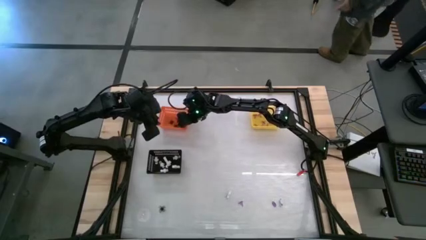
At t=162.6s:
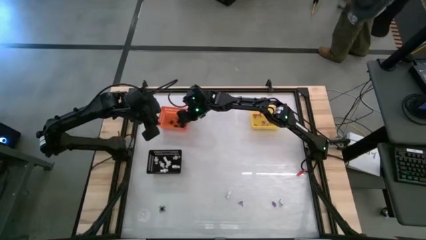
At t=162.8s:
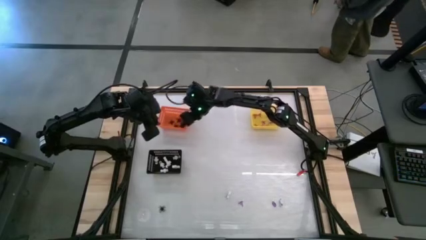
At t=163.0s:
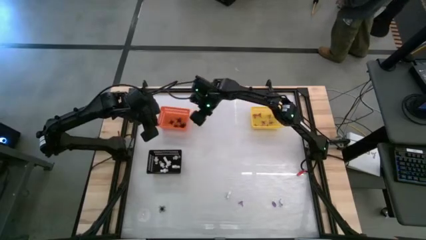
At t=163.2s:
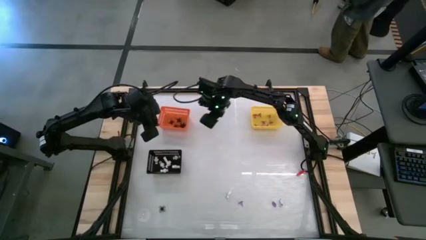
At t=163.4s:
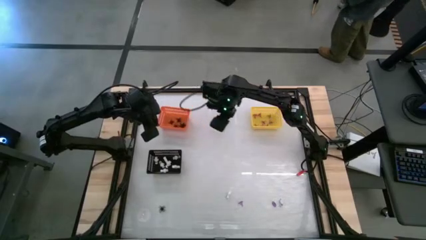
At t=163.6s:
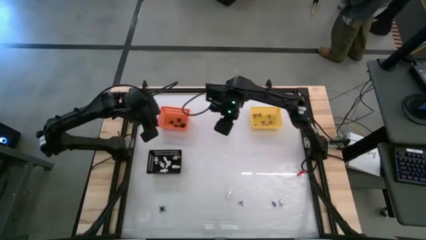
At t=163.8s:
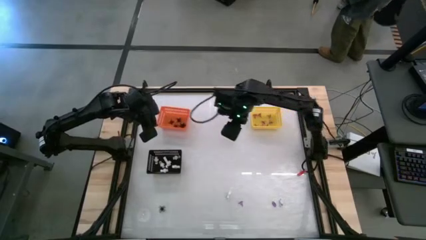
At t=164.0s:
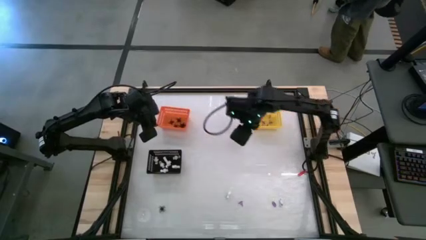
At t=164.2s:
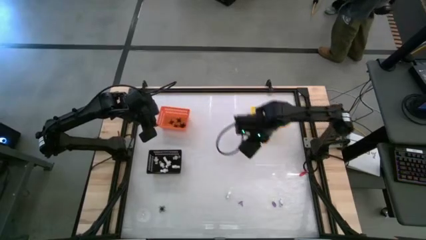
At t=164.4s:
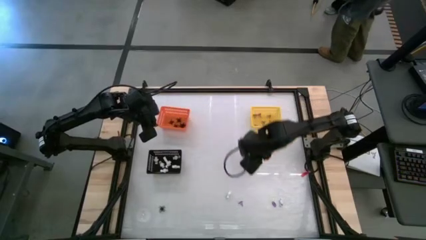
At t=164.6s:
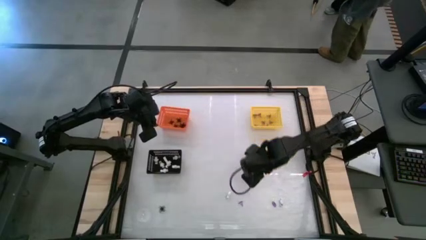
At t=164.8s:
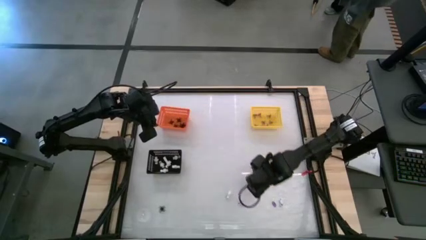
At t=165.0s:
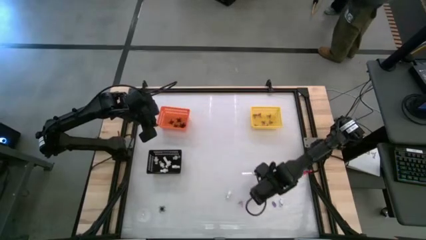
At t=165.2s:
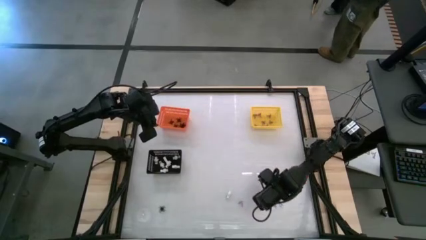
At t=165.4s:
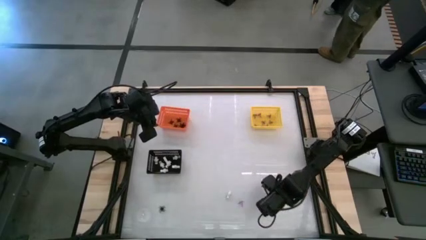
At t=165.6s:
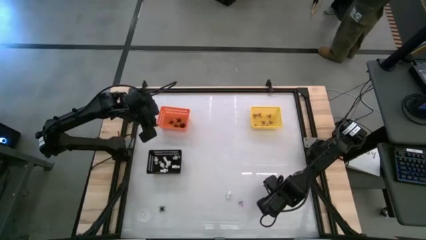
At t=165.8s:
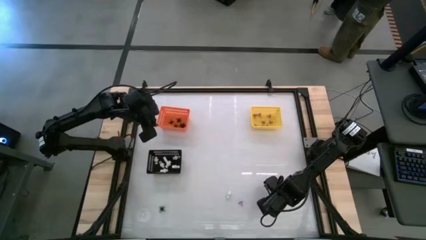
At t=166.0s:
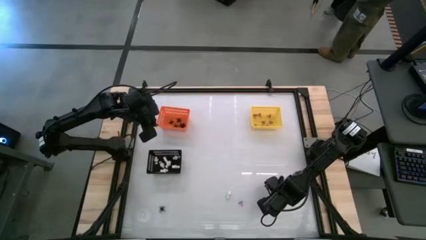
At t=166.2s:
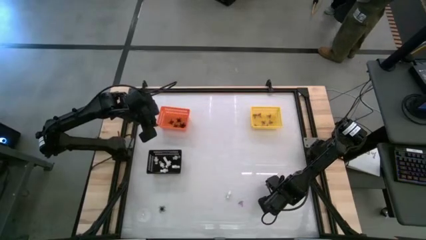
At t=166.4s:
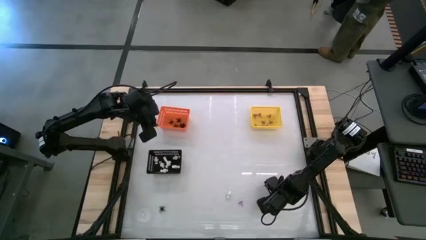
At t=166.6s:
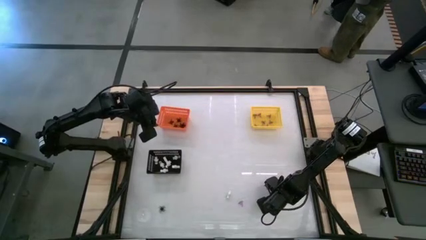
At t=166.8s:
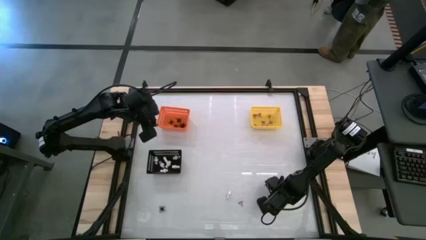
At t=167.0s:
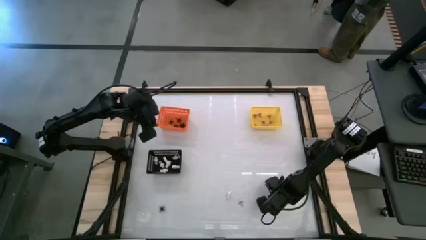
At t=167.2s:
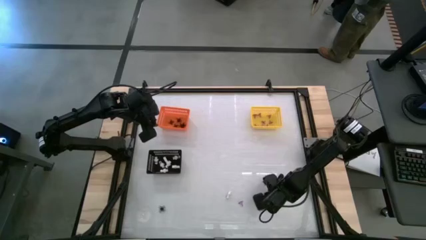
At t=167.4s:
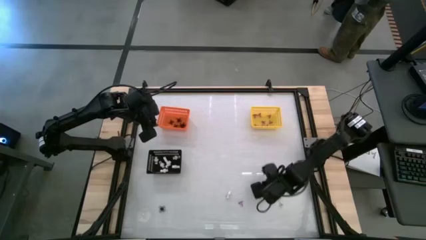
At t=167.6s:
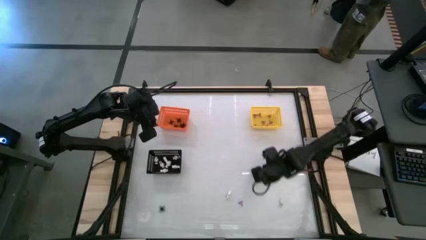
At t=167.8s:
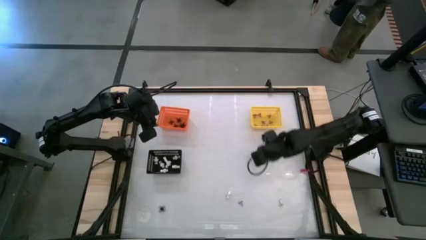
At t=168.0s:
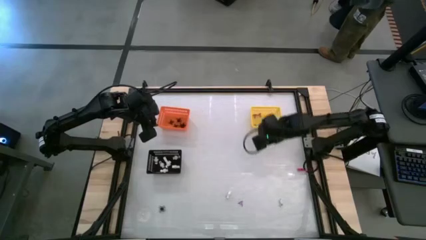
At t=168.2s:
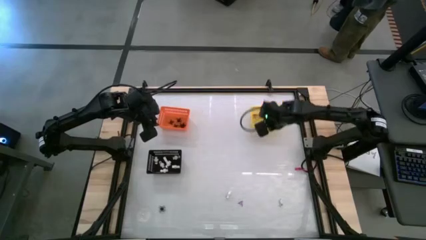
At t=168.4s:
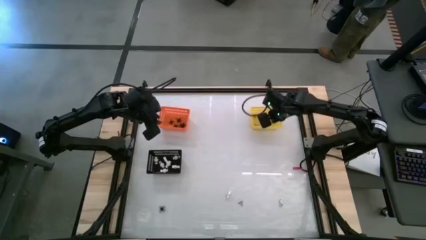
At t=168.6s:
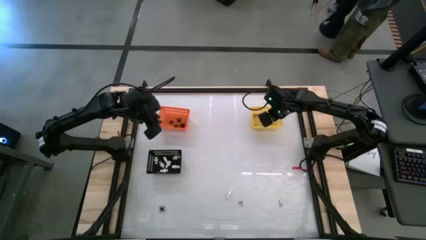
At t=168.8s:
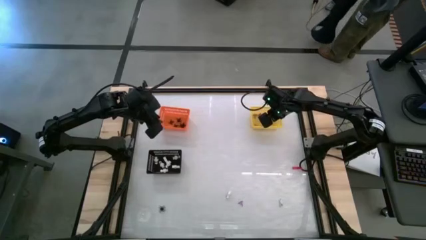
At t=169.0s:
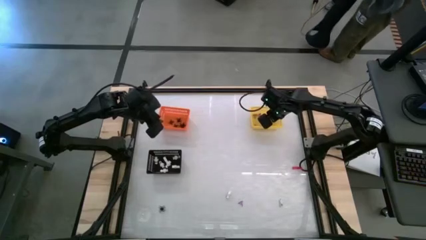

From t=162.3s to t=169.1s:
Task: Sort Halloween decoration
Put the violet witch hat into the yellow bin

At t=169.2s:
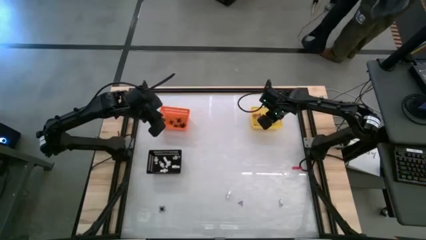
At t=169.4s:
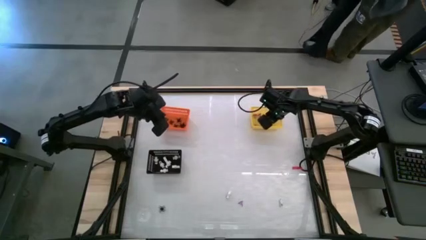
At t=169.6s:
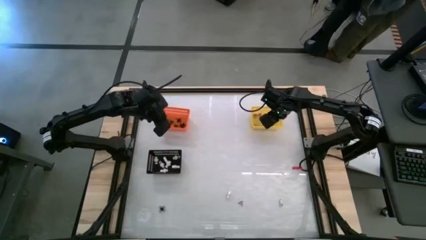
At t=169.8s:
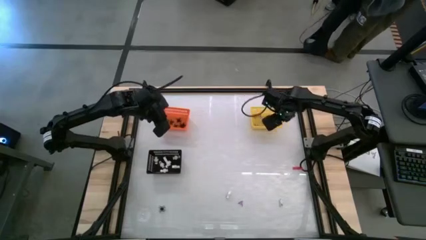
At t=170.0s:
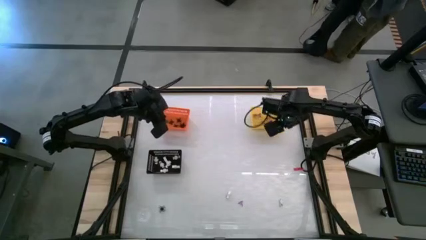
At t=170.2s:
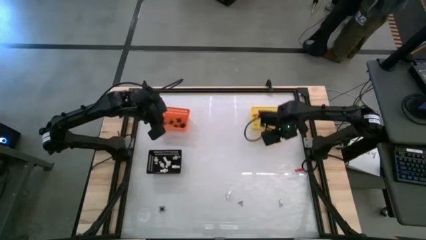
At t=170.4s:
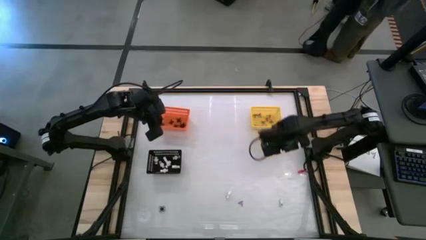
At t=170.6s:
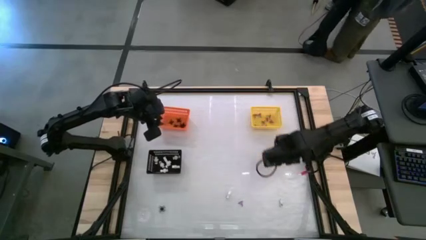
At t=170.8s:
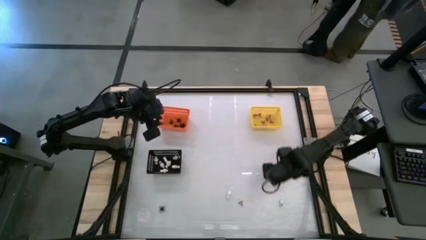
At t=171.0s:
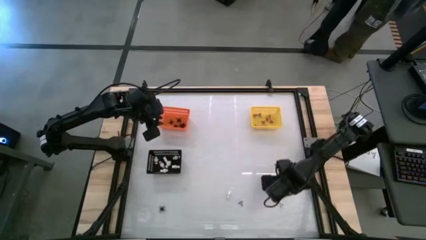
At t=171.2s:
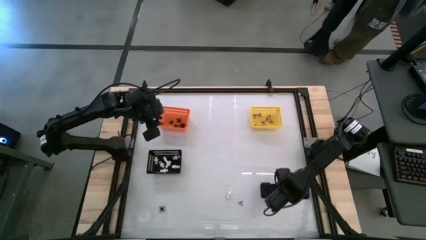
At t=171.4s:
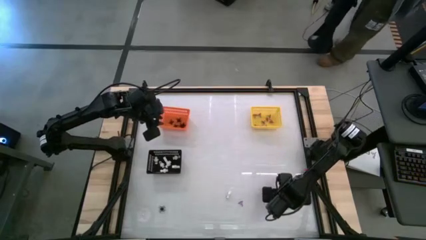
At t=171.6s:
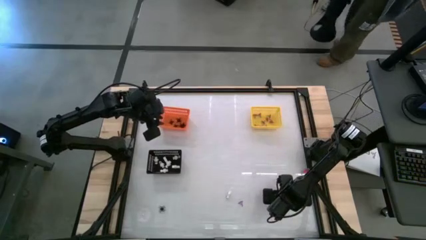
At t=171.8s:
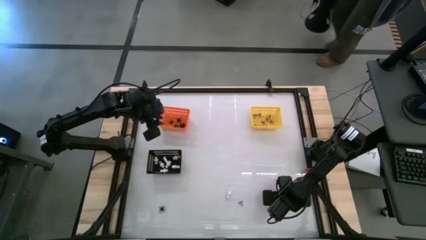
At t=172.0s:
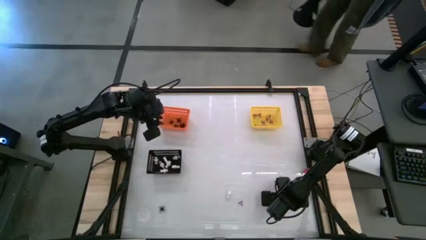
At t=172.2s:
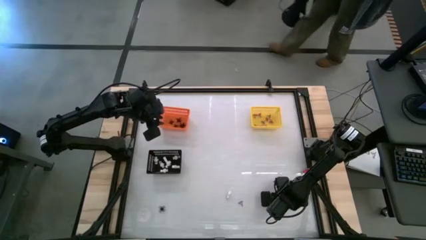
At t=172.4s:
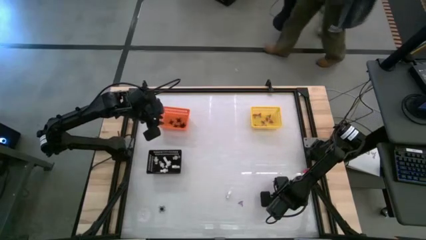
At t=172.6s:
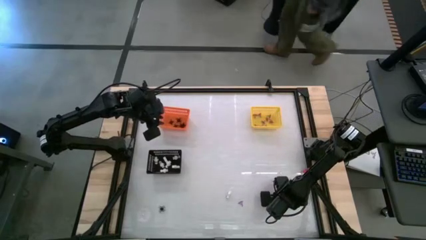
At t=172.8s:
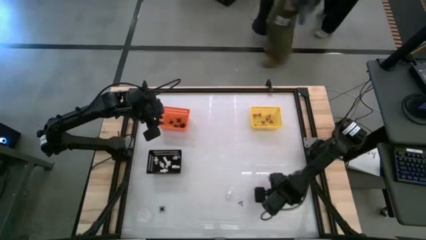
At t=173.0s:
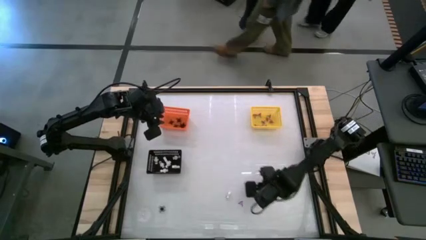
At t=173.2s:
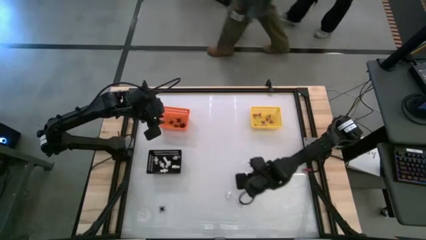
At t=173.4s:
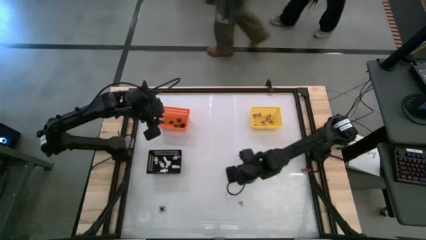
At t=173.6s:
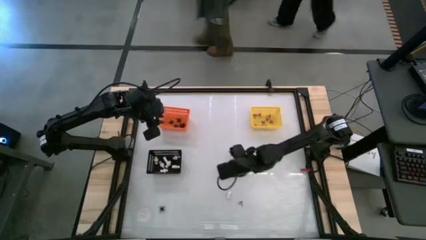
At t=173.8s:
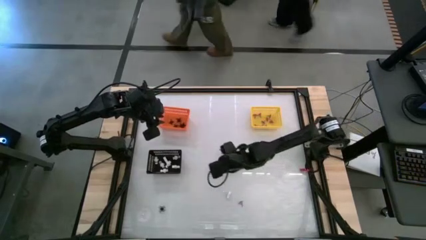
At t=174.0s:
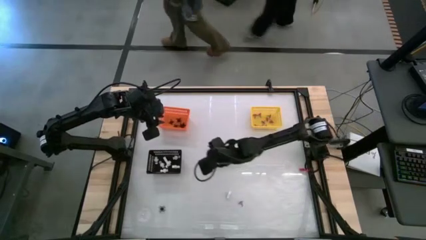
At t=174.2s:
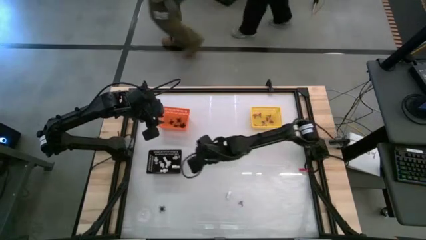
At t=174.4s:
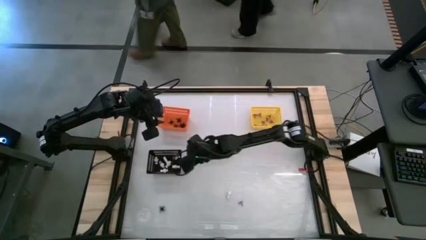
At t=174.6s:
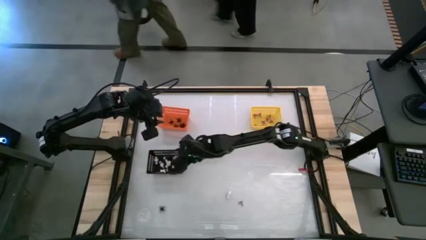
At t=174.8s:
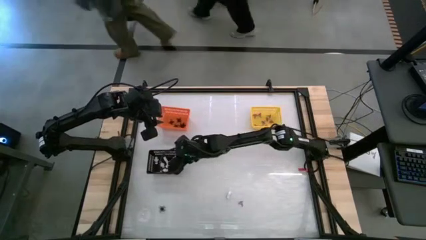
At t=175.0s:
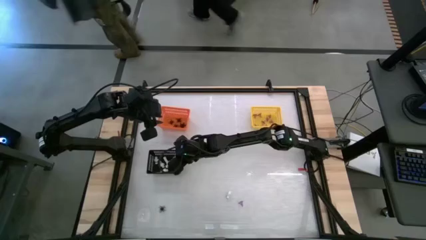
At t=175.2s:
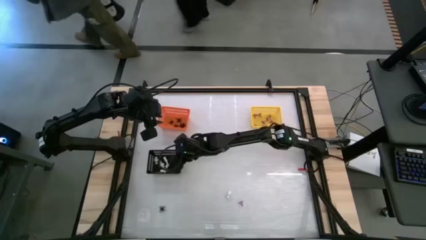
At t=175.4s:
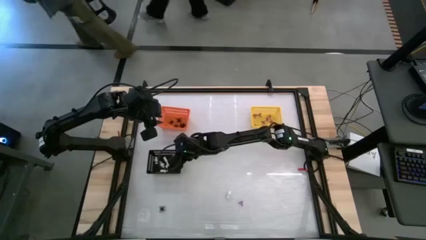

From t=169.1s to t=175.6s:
Put the white skeleton toy into the black bin

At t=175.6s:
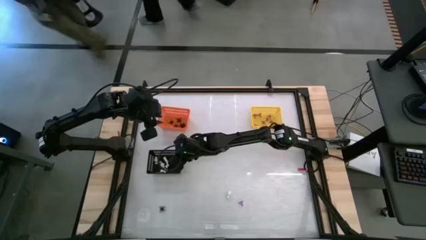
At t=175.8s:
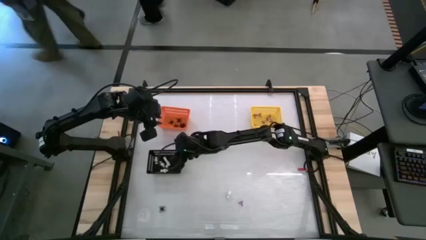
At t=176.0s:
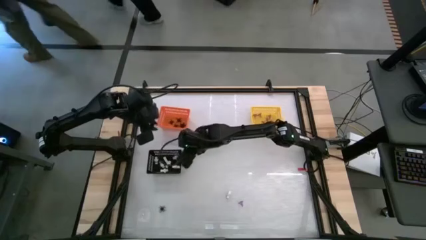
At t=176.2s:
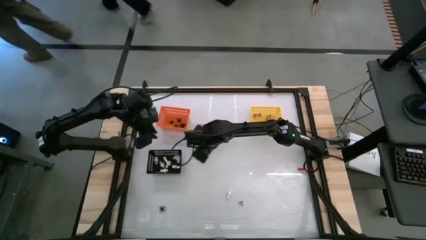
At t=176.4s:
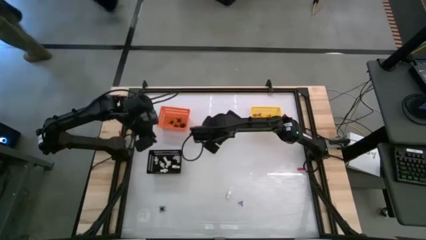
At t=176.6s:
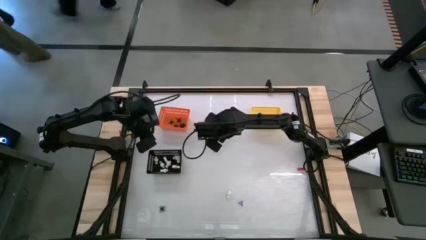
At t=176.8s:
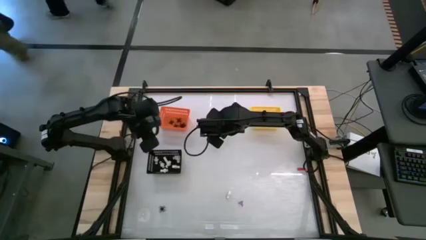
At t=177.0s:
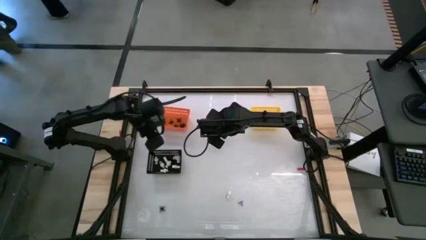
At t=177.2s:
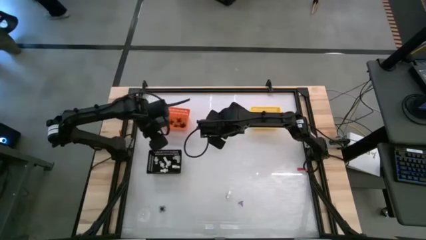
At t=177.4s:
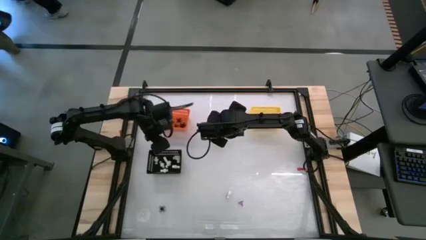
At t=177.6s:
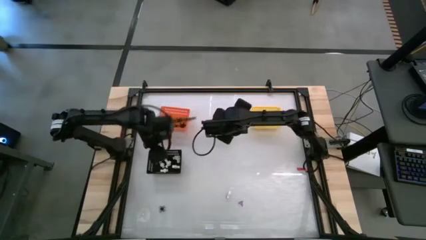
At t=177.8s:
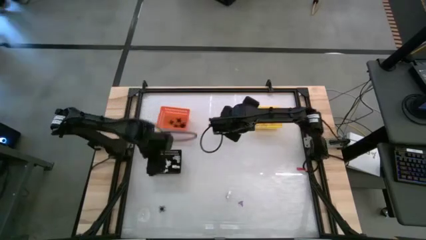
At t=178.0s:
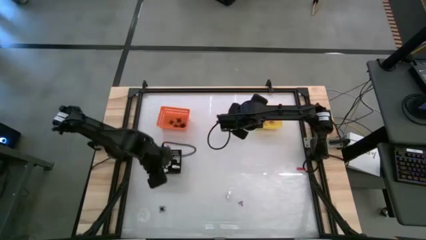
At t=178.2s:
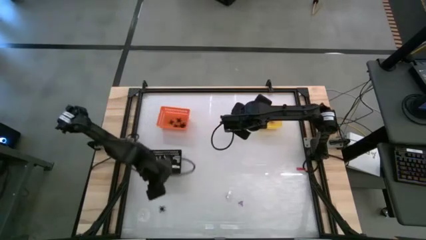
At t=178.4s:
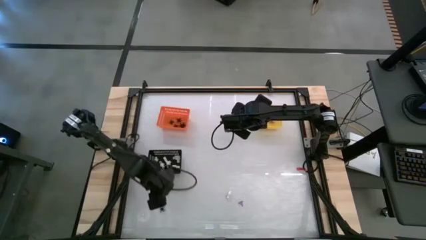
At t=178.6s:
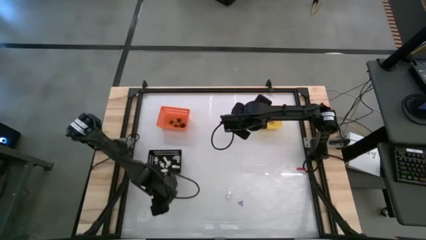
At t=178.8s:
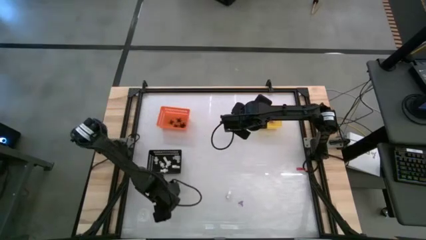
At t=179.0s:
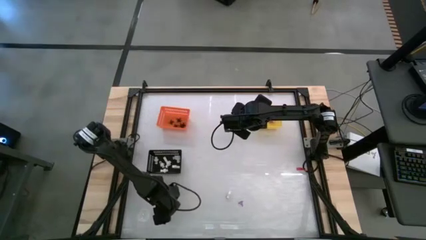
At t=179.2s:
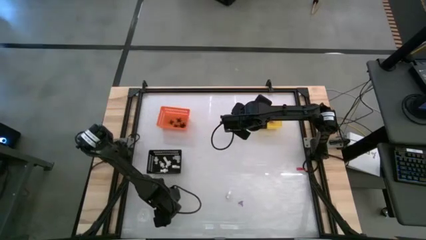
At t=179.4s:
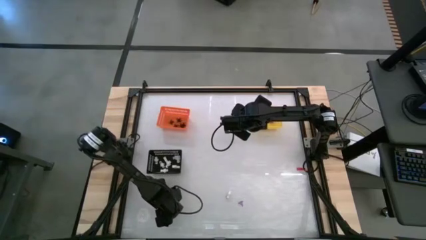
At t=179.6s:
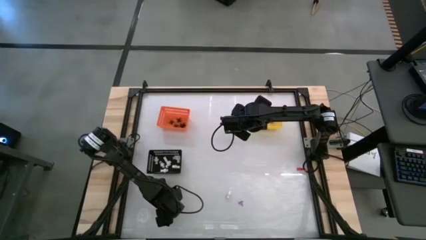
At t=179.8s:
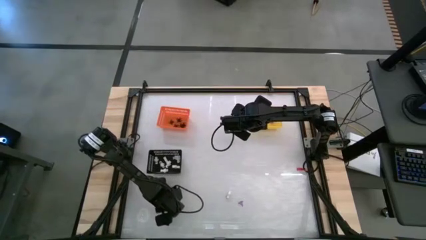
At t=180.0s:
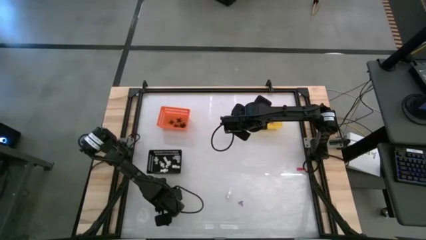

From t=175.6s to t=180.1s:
Put the black spider toy into the orange bin
